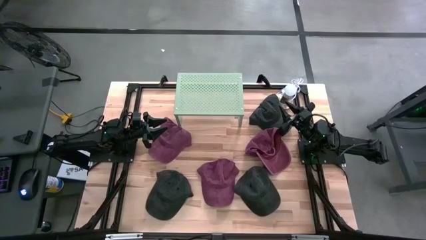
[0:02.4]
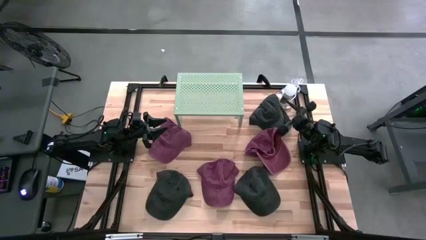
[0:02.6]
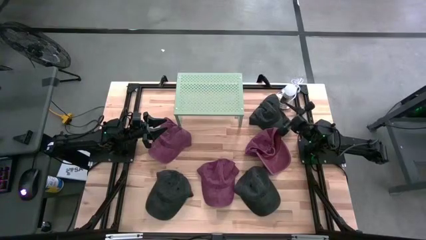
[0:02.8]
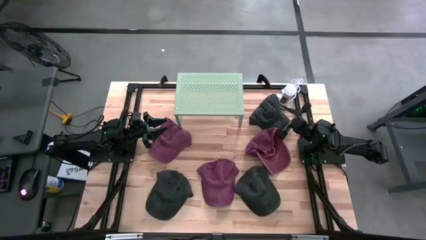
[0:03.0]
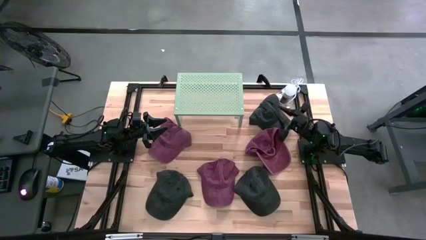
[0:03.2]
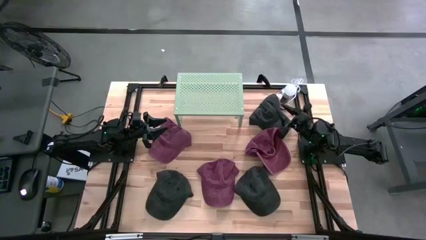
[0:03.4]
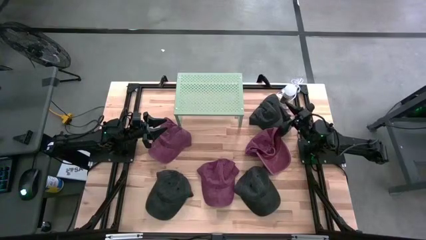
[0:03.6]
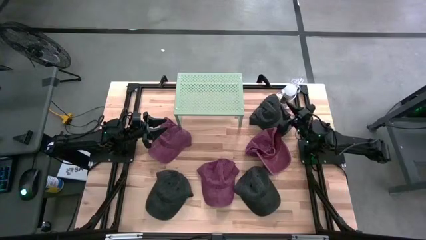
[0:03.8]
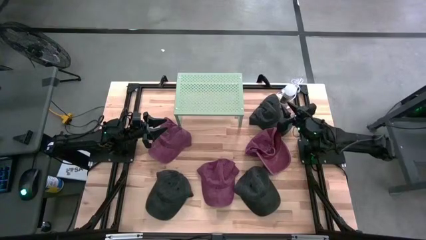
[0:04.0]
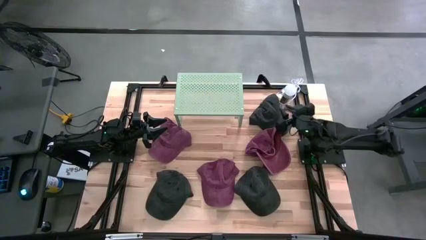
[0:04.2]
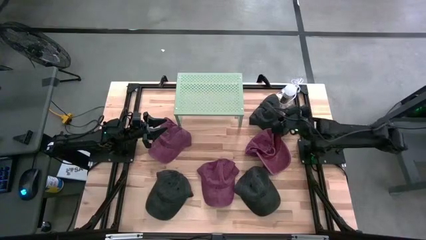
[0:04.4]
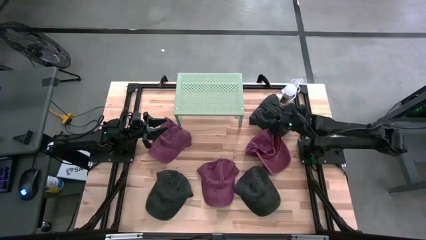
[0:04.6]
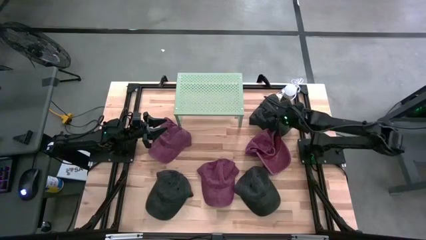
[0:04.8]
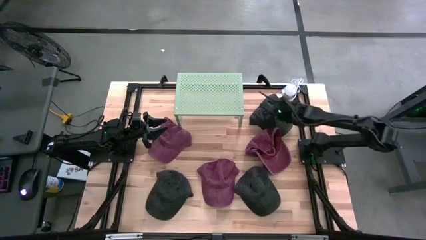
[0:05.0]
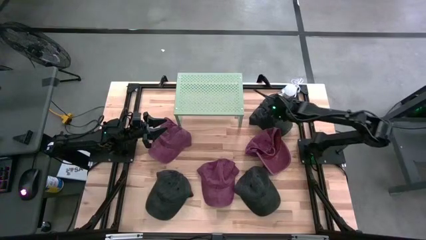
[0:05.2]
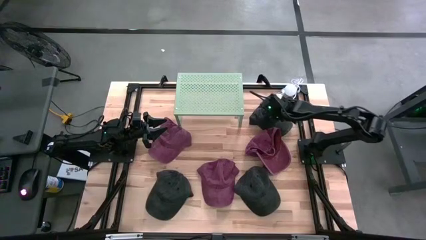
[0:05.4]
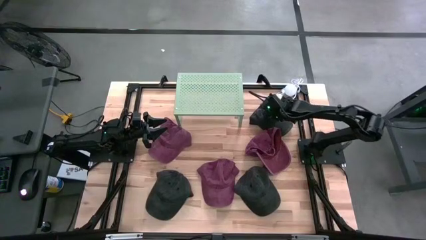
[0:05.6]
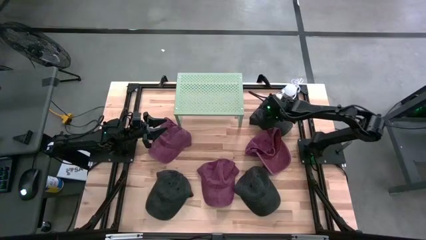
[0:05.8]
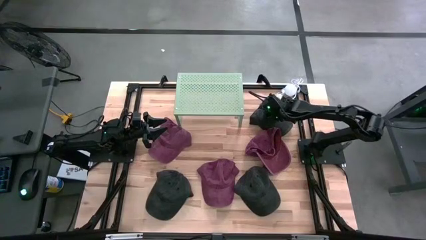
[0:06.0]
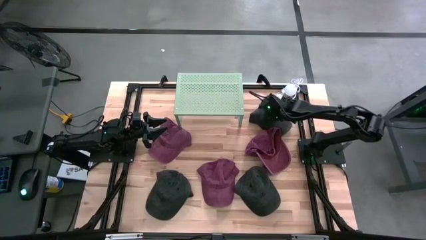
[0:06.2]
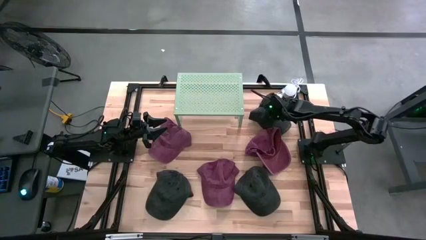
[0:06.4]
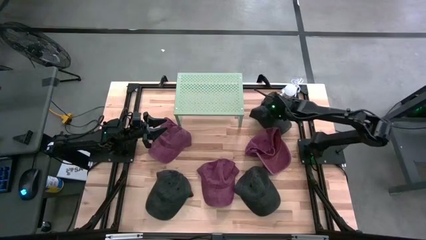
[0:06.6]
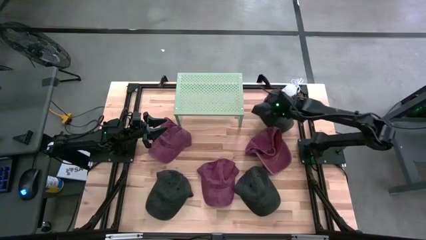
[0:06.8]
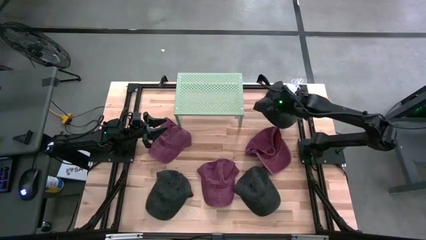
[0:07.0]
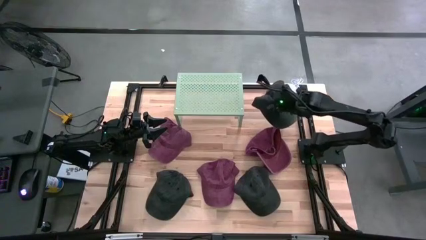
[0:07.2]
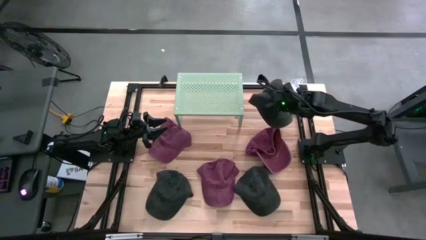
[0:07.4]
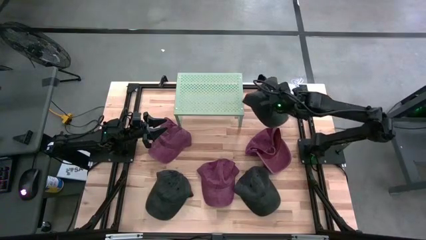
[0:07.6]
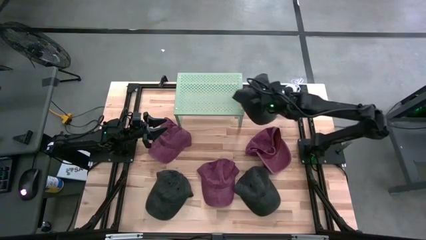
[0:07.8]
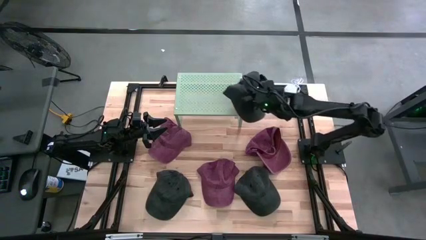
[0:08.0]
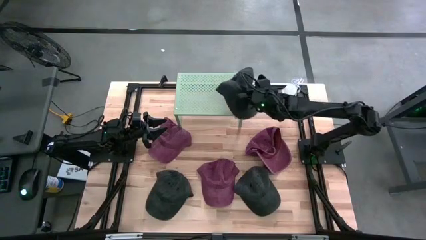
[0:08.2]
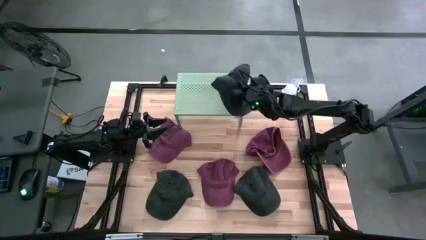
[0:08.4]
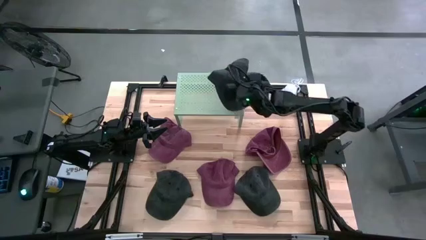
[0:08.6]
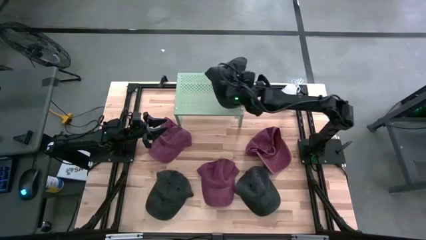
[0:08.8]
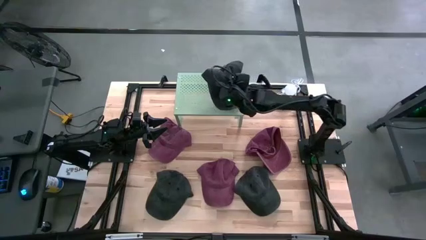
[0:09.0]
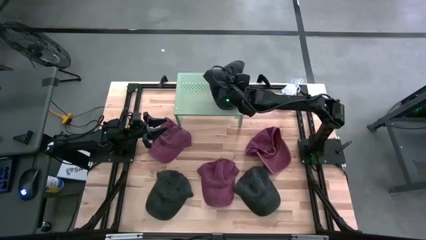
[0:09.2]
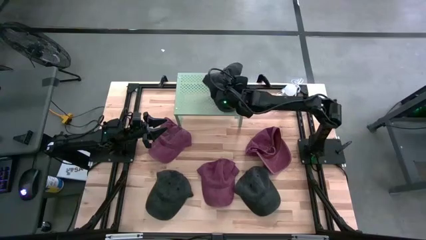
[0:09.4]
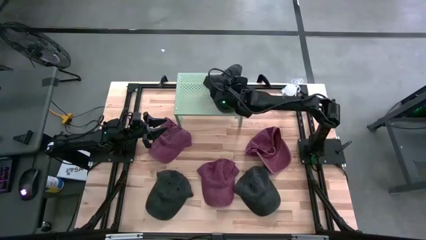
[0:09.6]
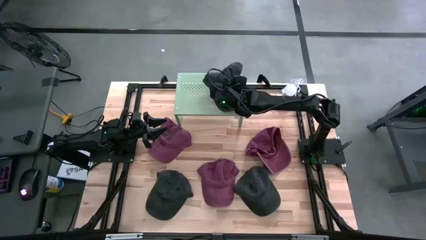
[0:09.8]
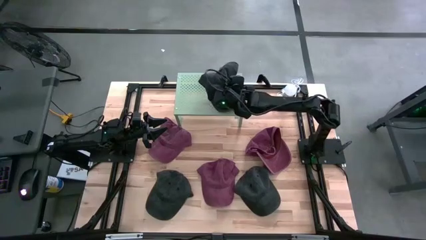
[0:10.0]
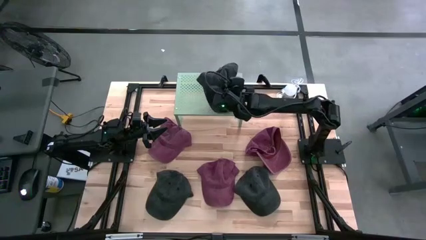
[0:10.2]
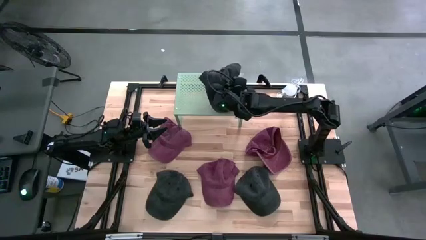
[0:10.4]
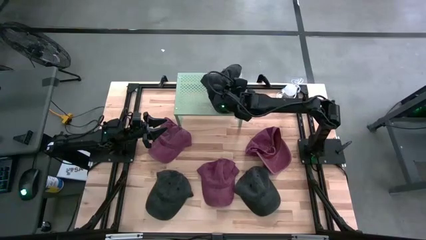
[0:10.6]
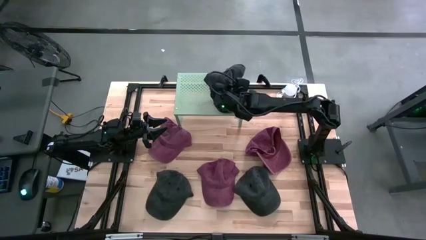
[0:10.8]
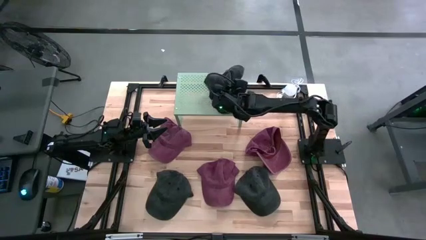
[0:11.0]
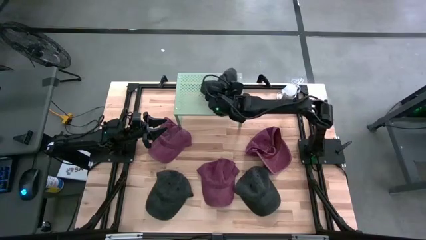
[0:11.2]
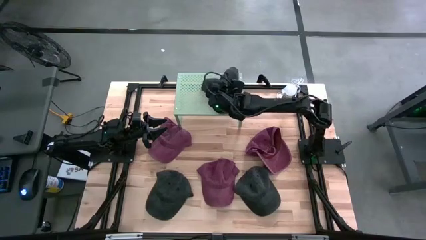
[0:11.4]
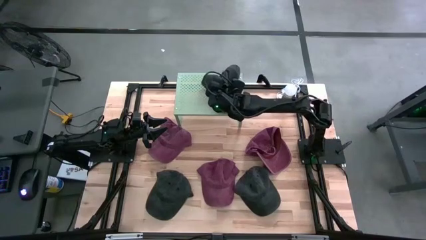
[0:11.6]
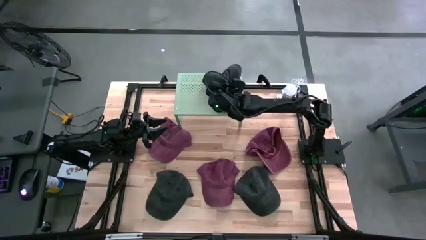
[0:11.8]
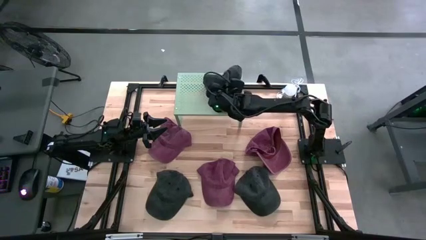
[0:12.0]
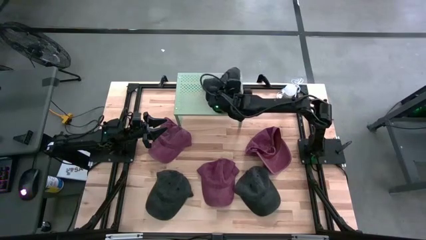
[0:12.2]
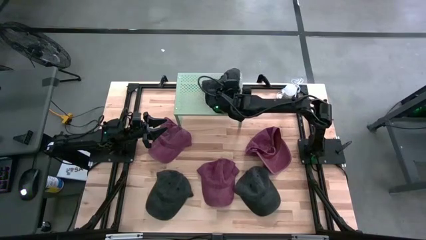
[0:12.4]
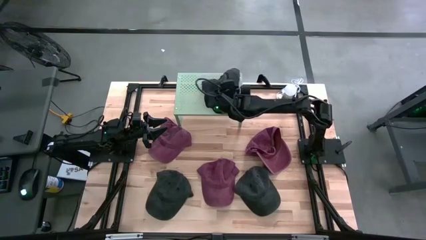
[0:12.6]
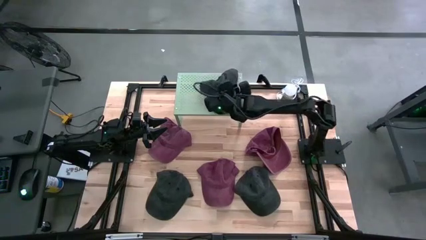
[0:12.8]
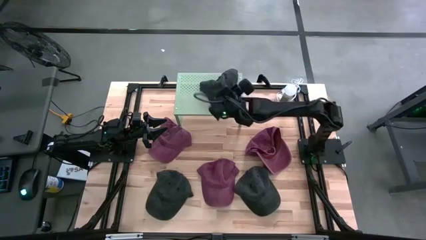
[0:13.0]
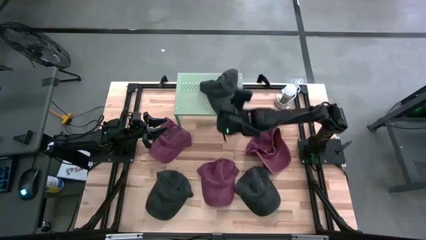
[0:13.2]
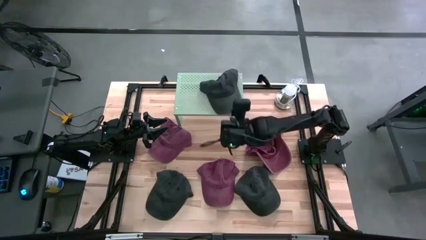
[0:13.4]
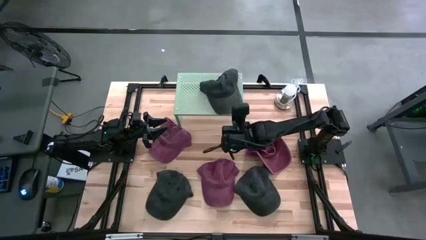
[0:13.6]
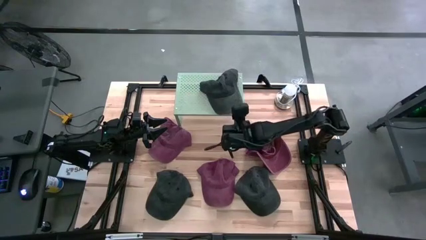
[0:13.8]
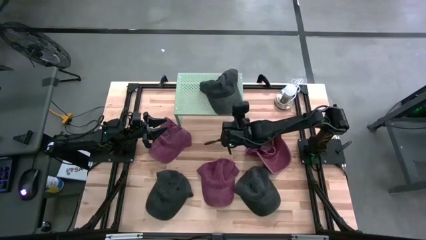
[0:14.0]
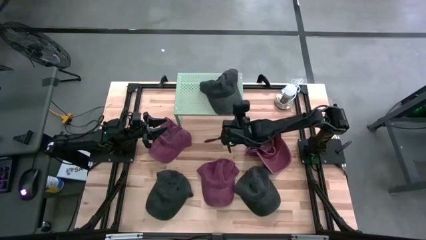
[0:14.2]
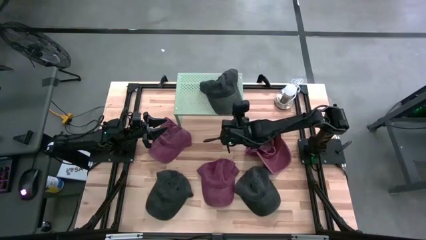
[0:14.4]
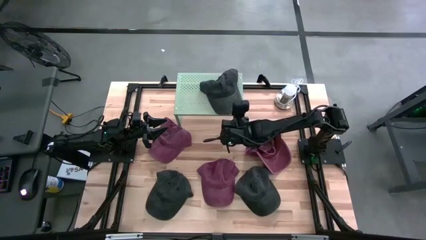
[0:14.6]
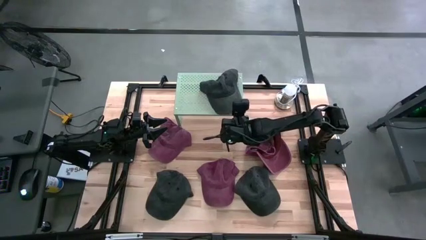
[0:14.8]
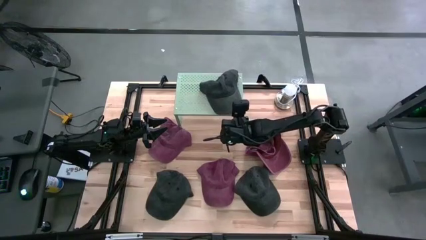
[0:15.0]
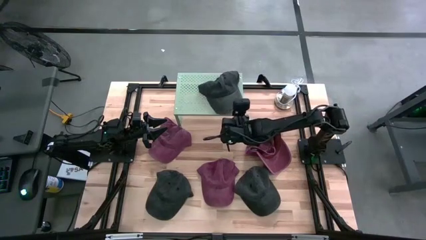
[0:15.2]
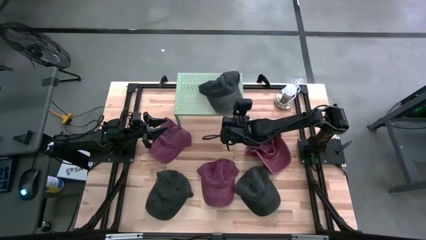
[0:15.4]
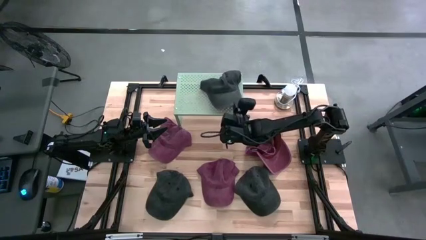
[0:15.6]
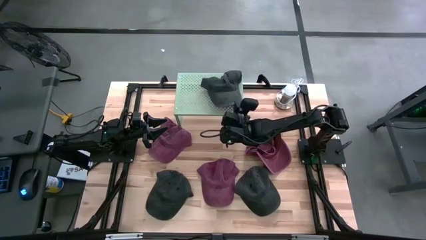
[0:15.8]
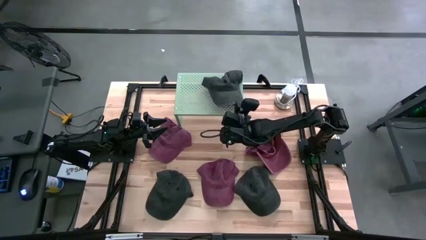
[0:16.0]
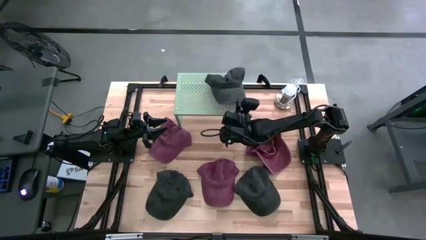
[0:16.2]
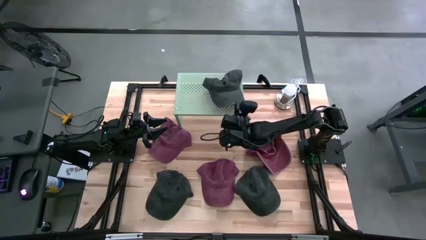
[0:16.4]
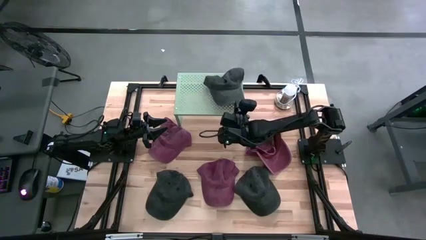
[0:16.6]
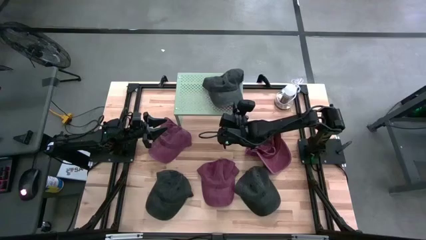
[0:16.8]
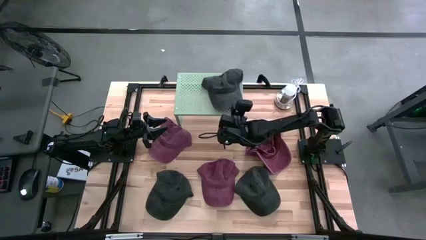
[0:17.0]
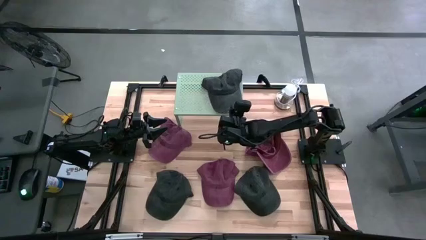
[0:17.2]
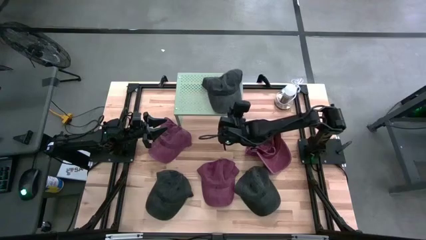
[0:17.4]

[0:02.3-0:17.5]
Task: Pick & Place hat
Put the top black cap on the shelf
